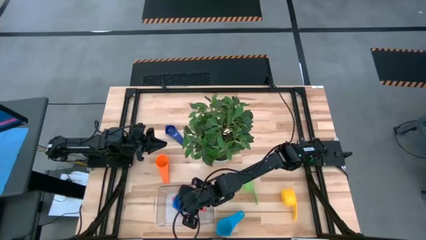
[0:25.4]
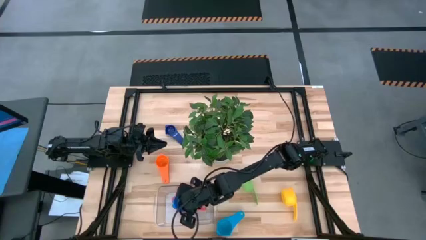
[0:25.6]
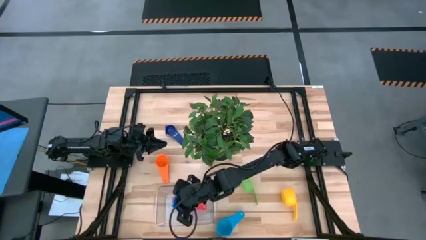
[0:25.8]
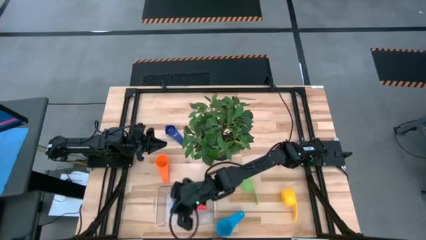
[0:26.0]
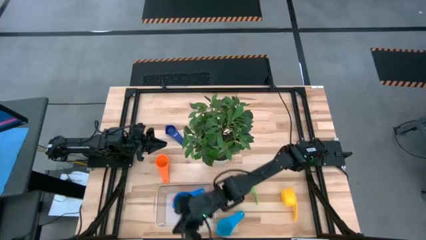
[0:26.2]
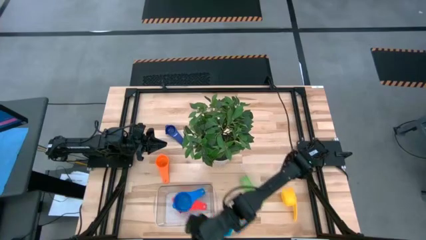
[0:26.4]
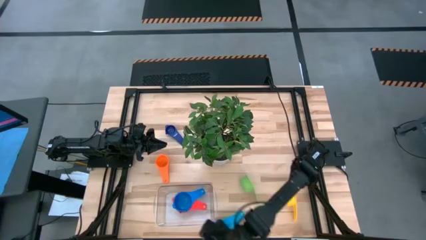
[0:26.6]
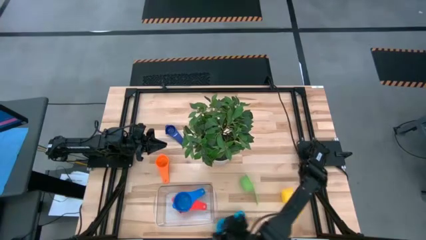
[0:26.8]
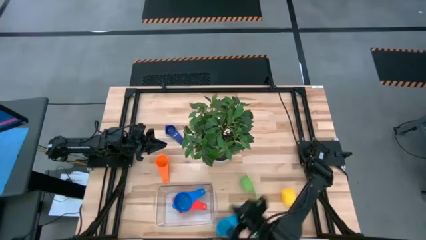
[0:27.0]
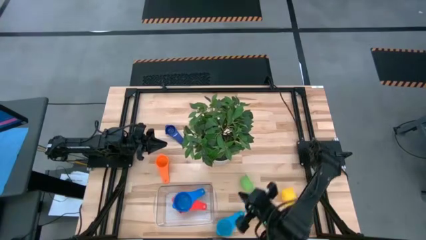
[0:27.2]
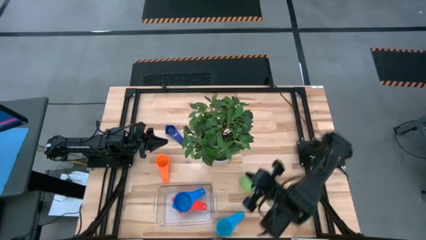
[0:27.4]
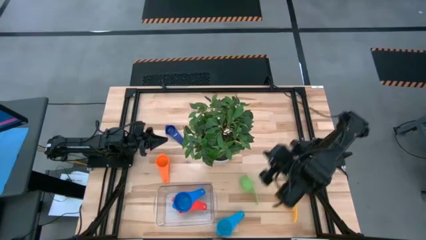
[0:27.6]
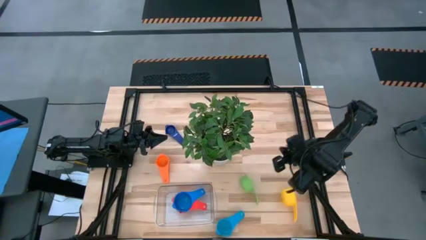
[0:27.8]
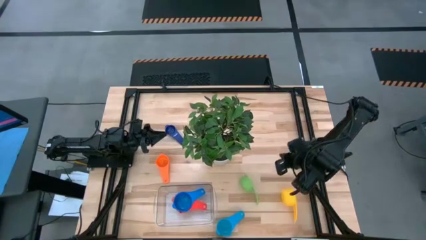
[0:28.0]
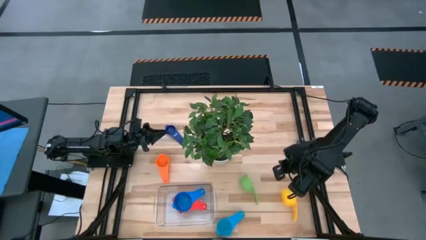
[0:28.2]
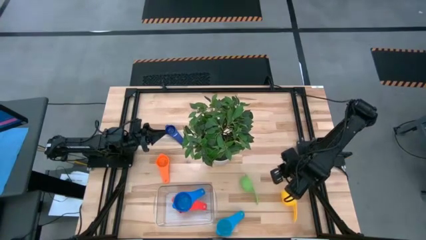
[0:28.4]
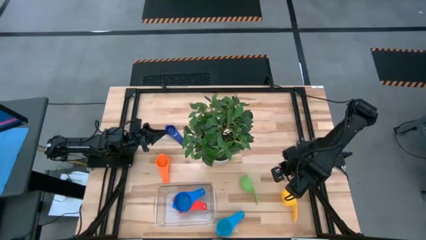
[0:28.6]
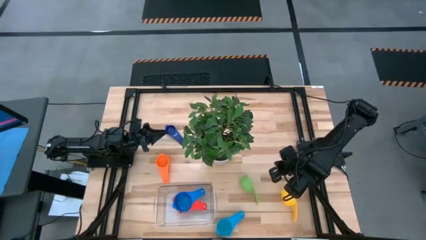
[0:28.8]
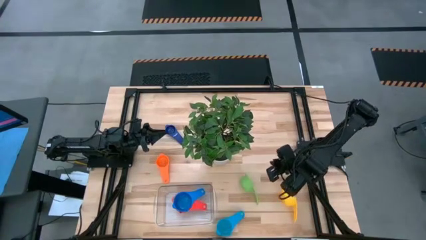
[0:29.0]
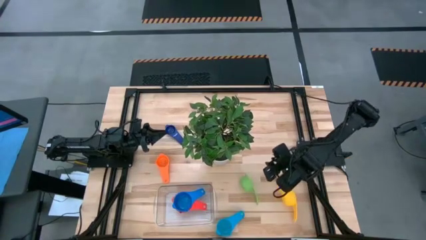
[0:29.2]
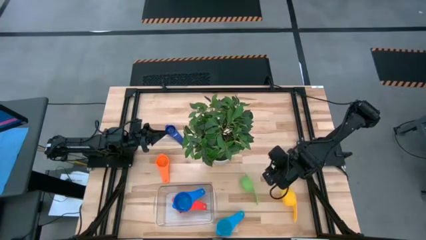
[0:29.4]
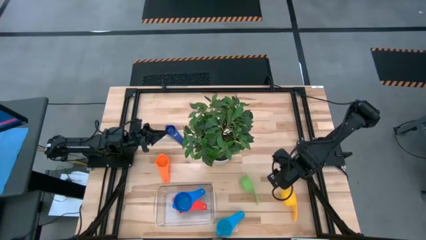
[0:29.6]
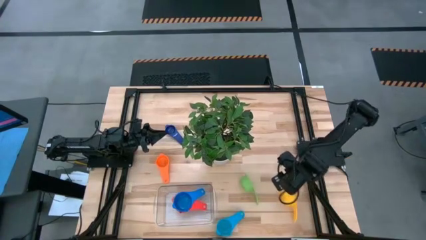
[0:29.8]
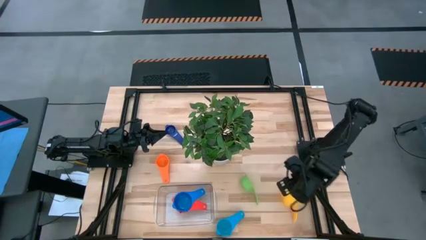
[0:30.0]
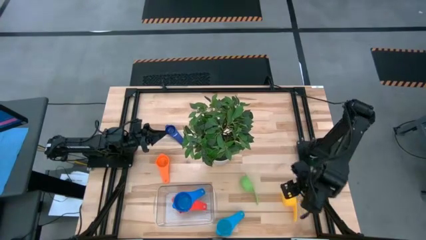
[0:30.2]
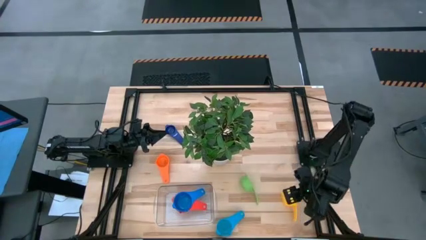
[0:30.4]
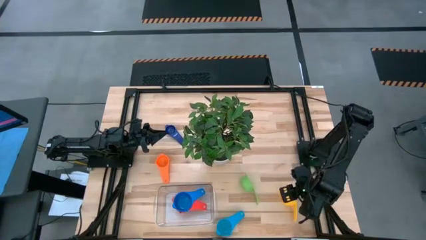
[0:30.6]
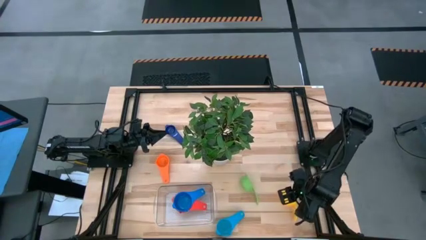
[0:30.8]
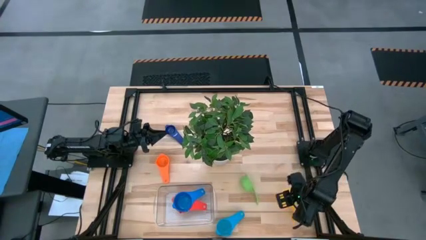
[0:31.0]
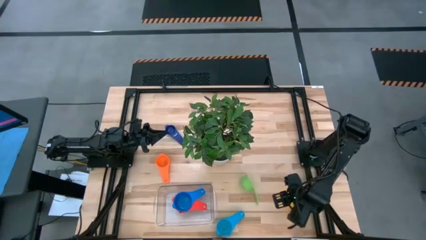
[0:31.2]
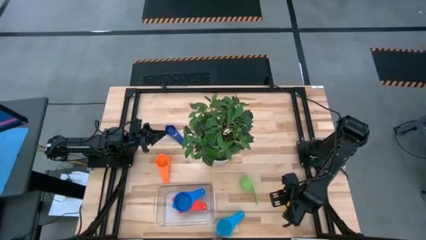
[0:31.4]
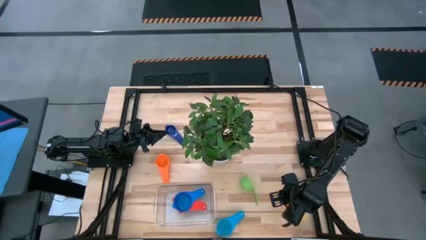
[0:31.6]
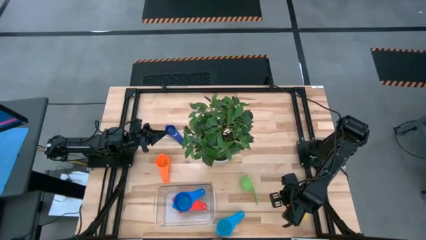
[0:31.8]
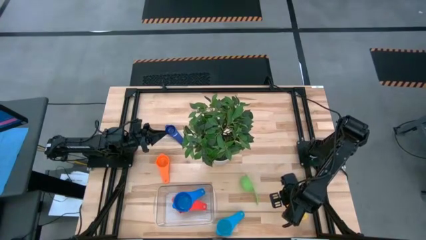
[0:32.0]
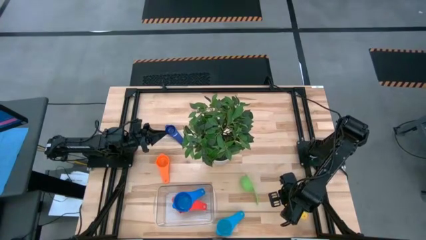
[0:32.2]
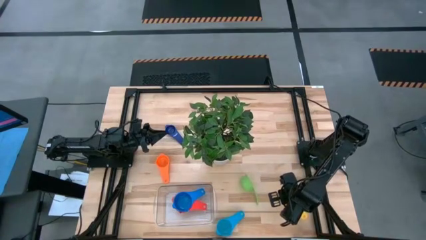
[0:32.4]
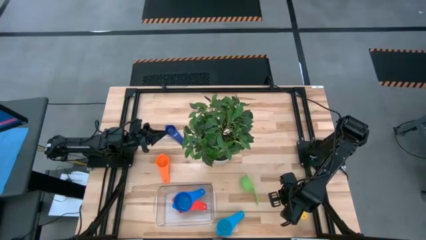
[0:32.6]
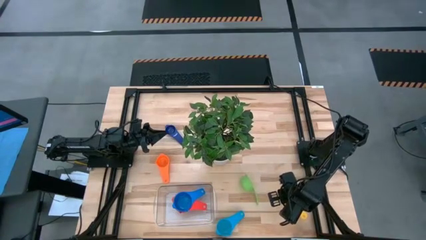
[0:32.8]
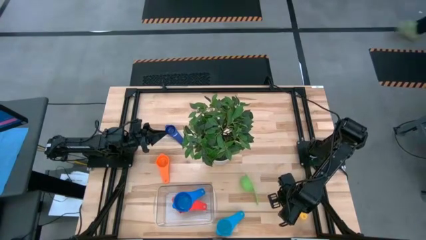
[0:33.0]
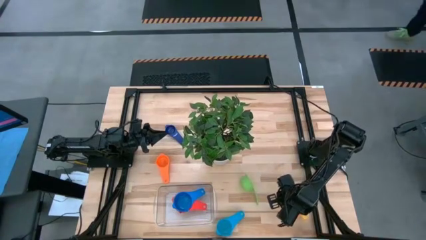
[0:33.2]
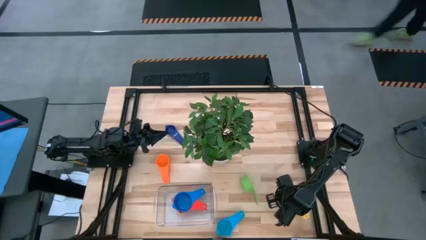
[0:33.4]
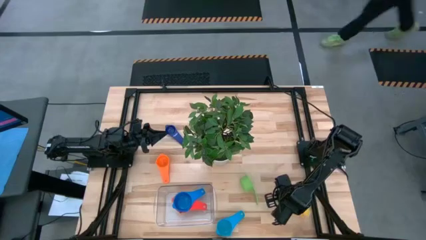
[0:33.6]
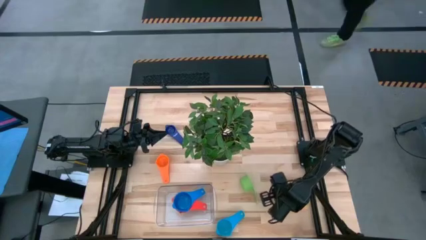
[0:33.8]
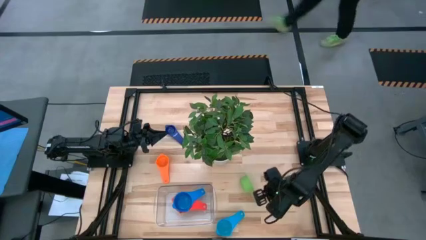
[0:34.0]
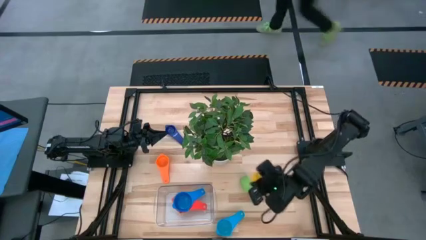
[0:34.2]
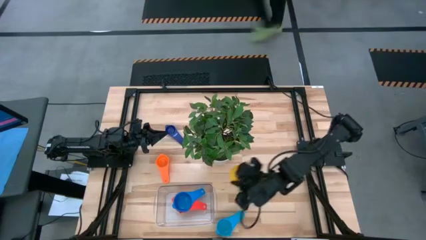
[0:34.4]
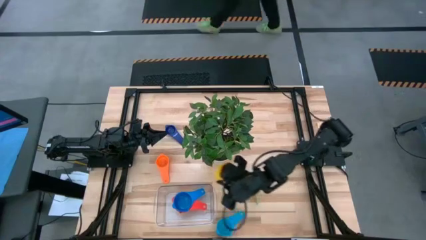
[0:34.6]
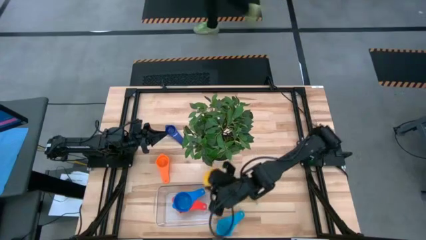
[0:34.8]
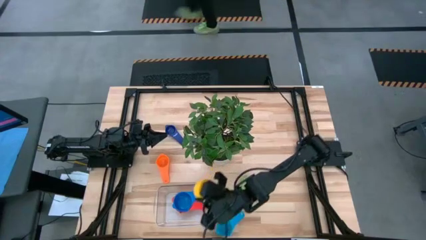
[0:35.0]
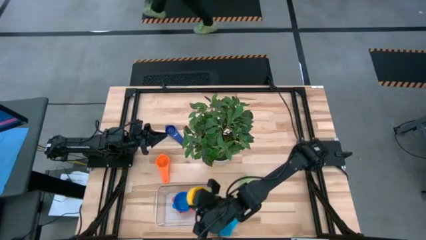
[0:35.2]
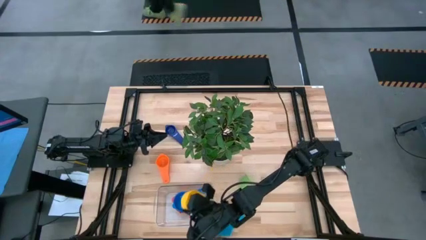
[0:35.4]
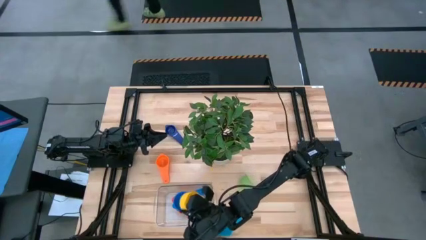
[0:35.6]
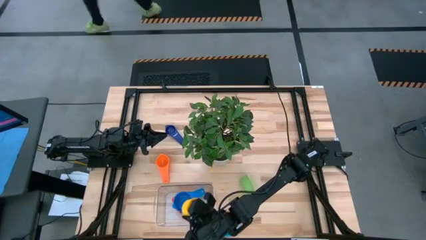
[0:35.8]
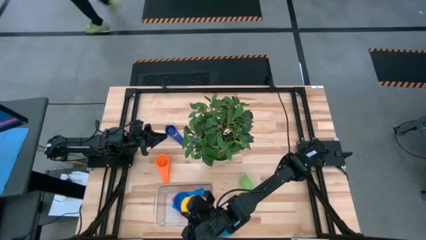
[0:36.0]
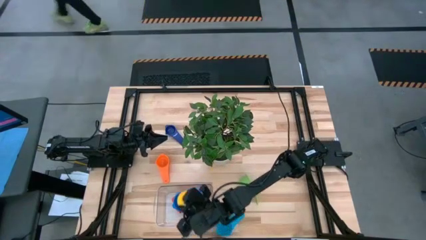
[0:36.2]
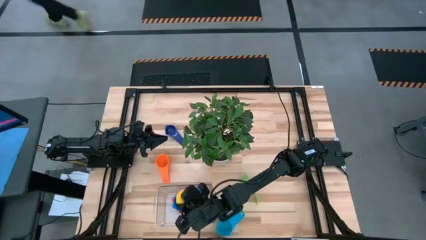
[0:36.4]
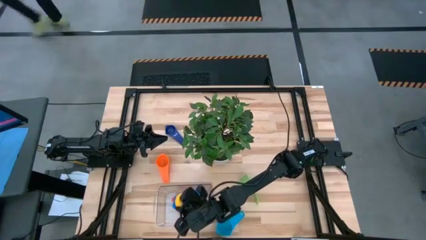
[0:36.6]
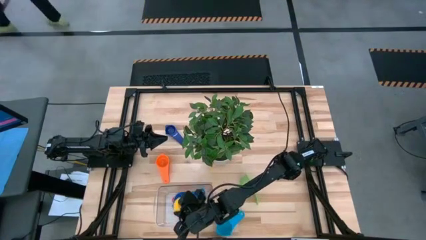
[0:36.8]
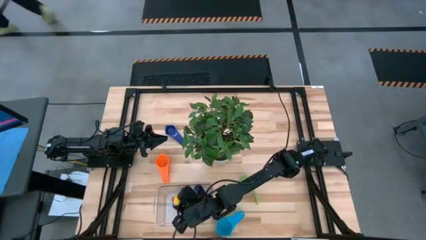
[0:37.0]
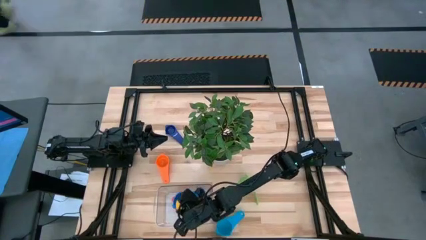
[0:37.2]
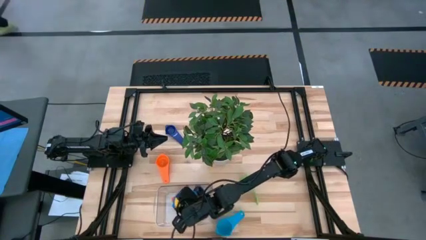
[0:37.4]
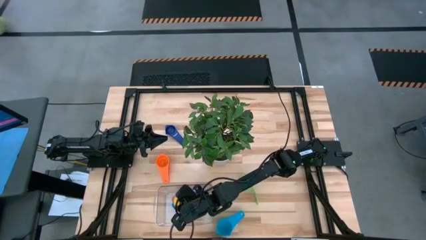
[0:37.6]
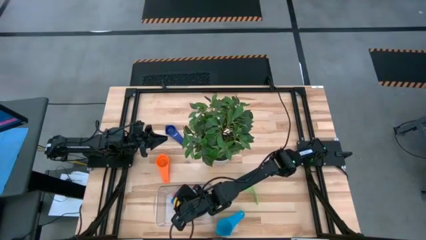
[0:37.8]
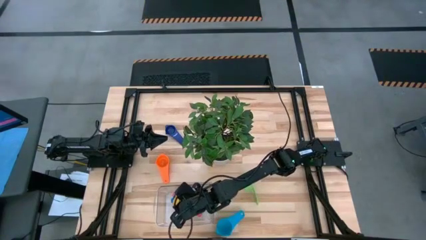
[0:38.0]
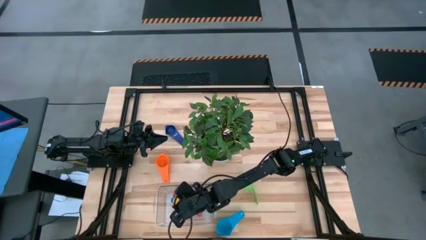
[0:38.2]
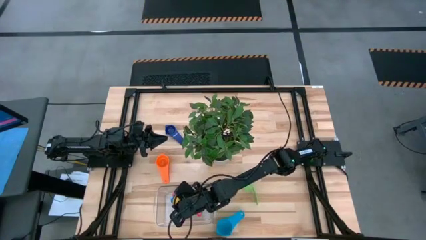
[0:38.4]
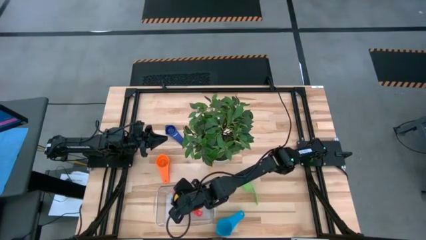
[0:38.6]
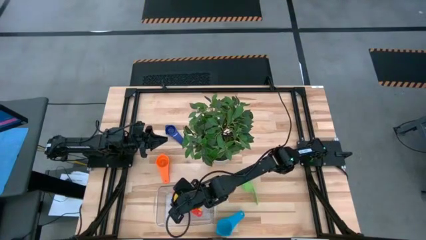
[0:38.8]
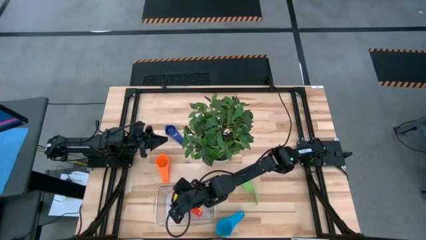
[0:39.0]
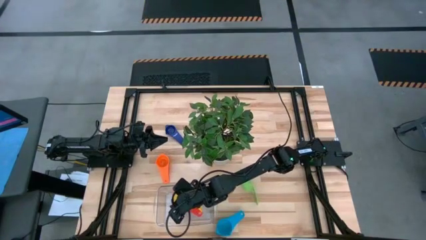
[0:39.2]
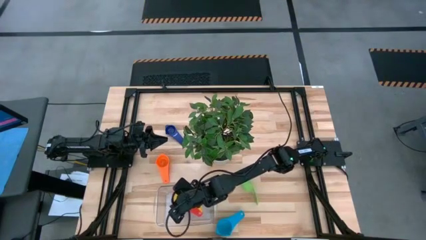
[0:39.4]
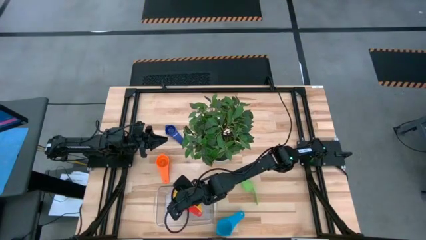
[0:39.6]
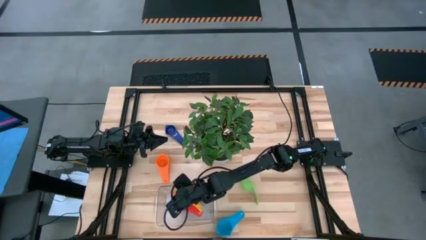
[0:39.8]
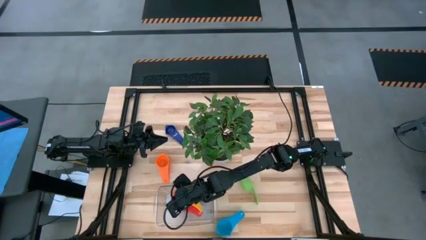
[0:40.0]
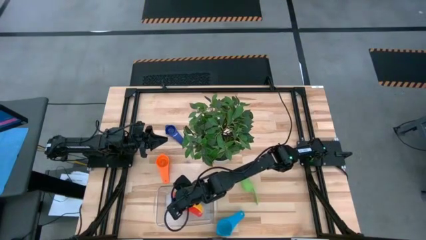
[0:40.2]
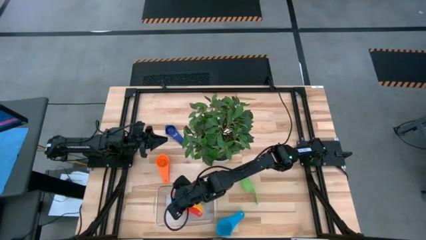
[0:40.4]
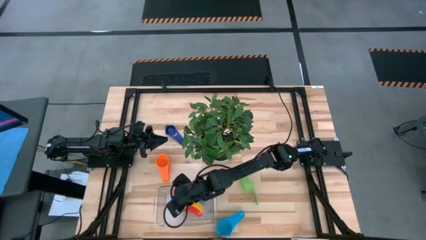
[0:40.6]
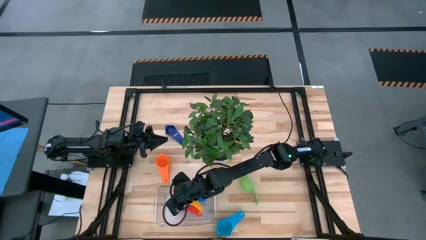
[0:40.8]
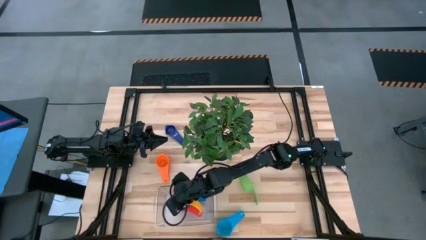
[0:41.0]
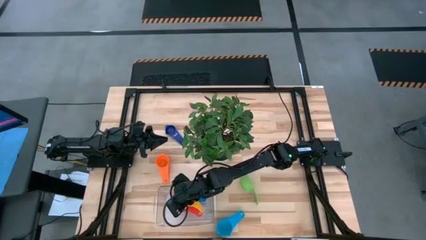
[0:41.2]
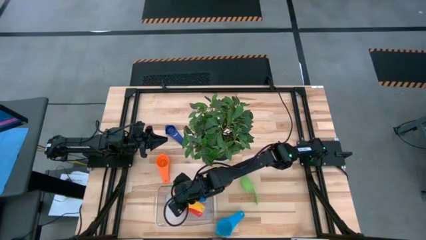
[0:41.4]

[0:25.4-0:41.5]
Task: Nest measuring cups in basket
Stack the yellow measuring cup on the blue measuring cup
